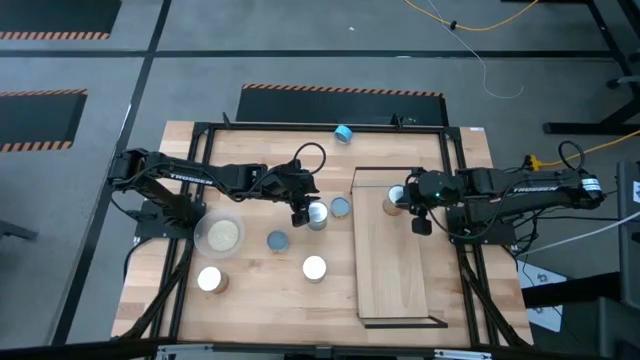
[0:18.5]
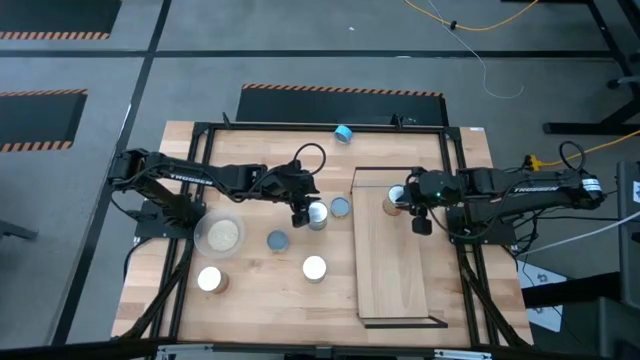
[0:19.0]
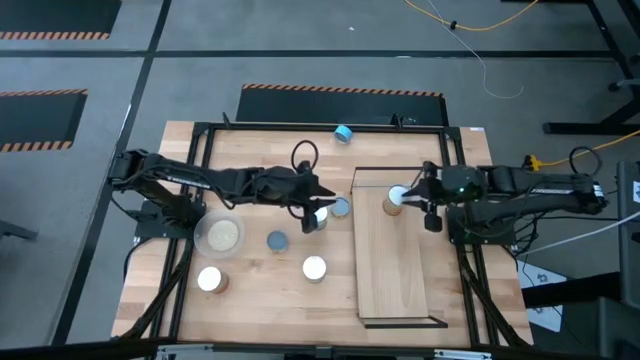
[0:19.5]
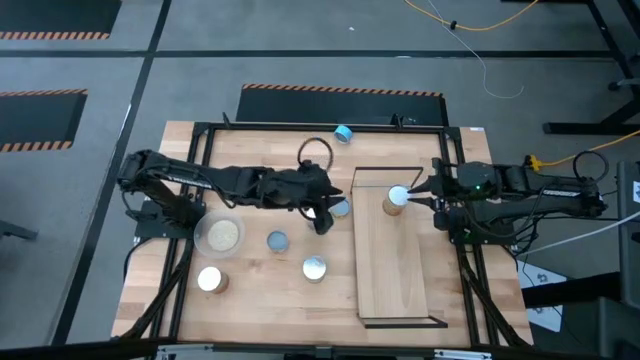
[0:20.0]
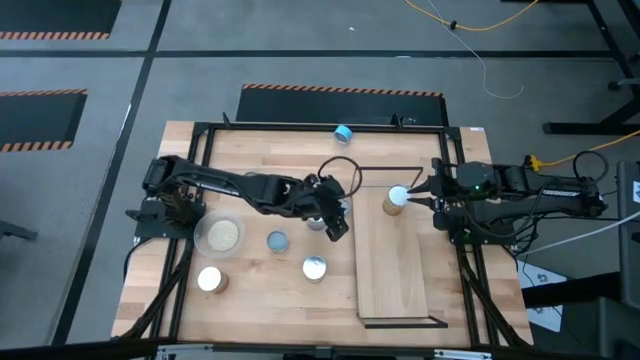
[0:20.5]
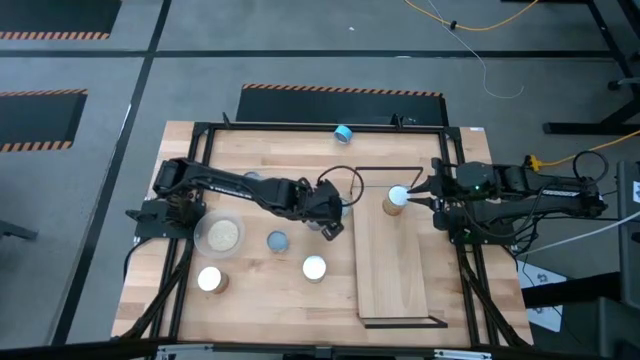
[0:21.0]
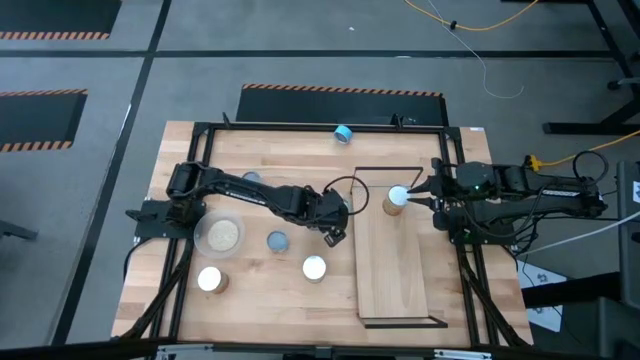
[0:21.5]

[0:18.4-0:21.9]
Task: Pick and place cans onto a shelf
Put the dark blue can onto the shelf aligned with the orange can

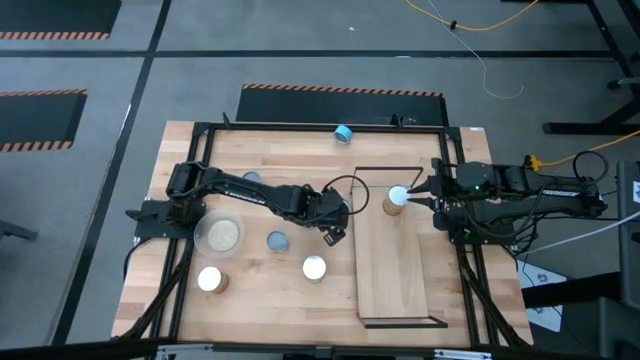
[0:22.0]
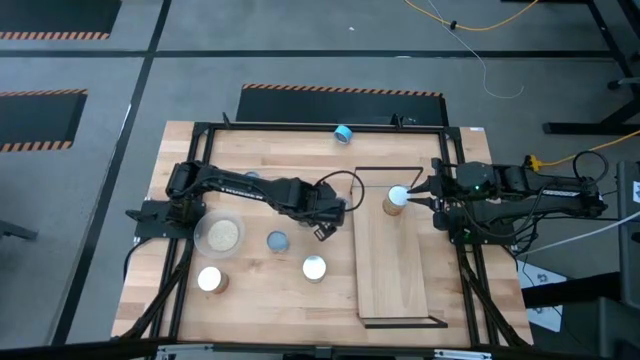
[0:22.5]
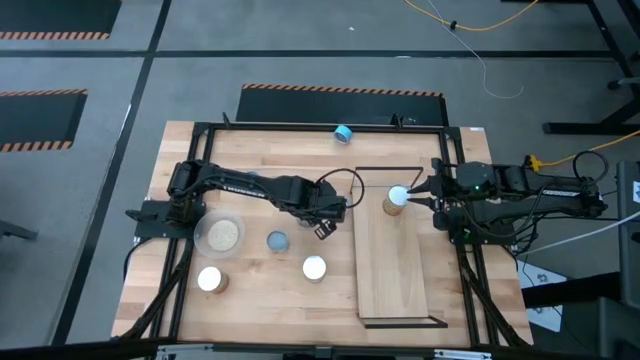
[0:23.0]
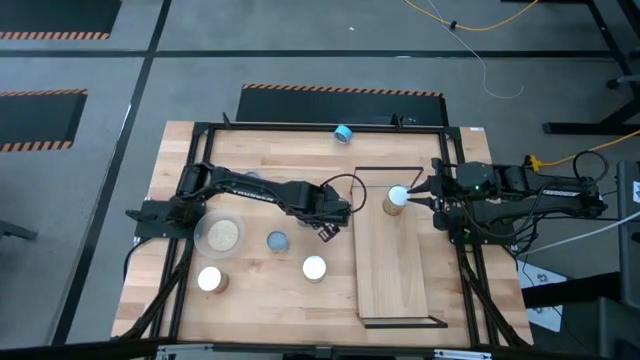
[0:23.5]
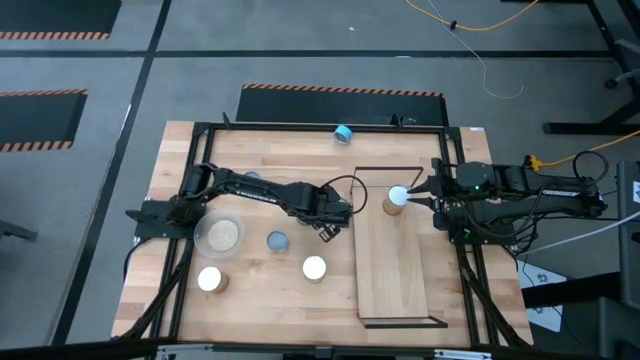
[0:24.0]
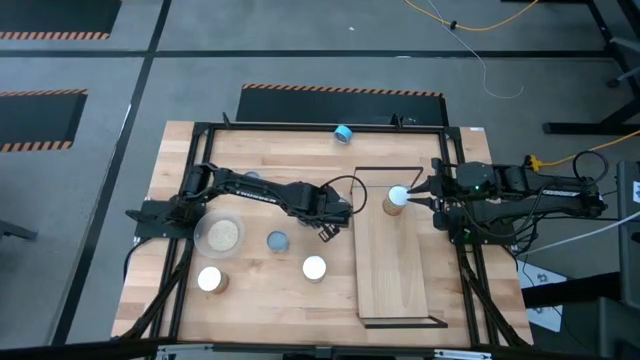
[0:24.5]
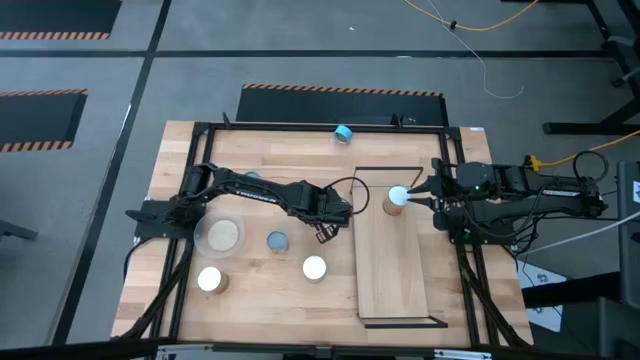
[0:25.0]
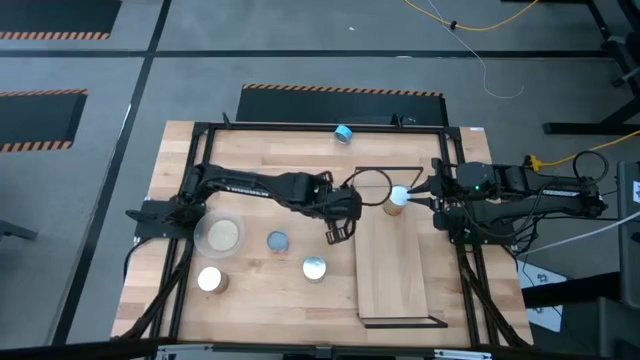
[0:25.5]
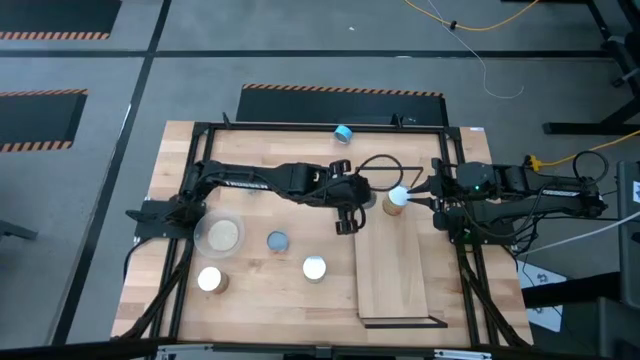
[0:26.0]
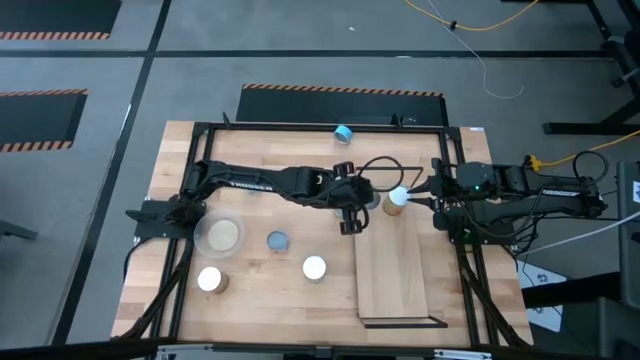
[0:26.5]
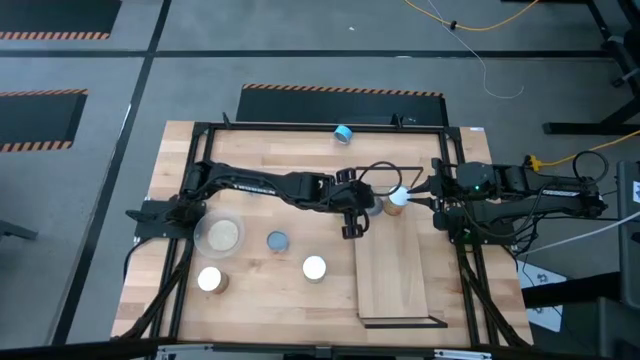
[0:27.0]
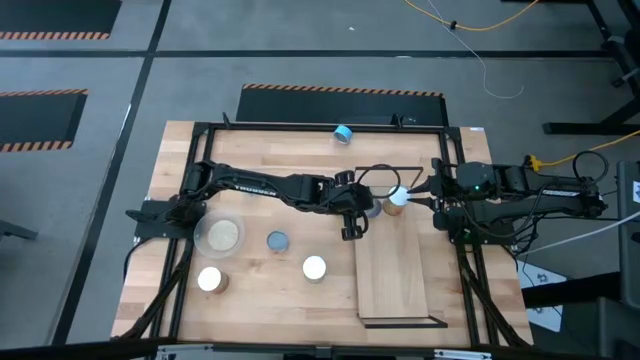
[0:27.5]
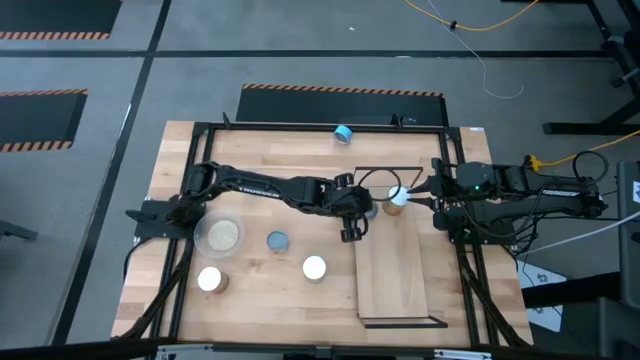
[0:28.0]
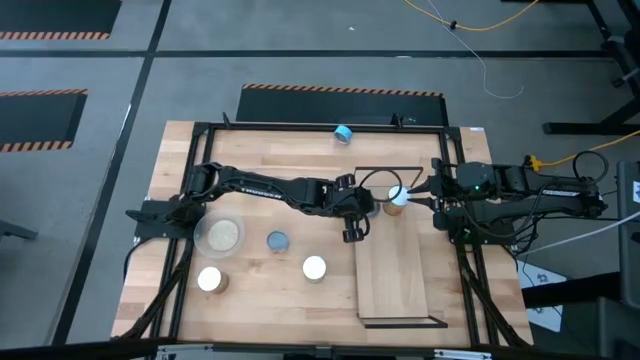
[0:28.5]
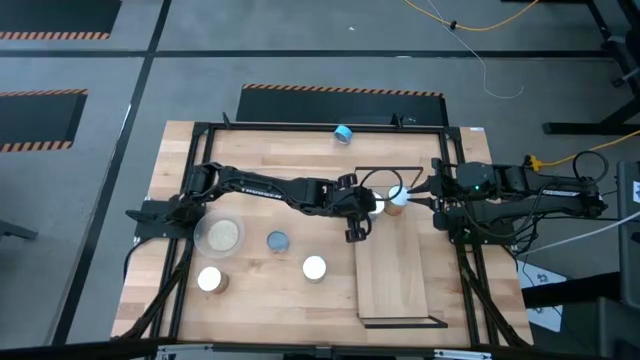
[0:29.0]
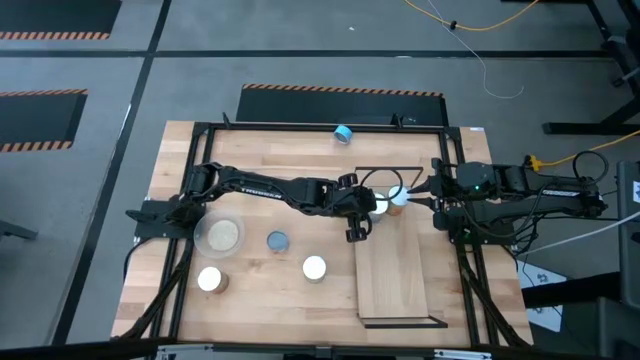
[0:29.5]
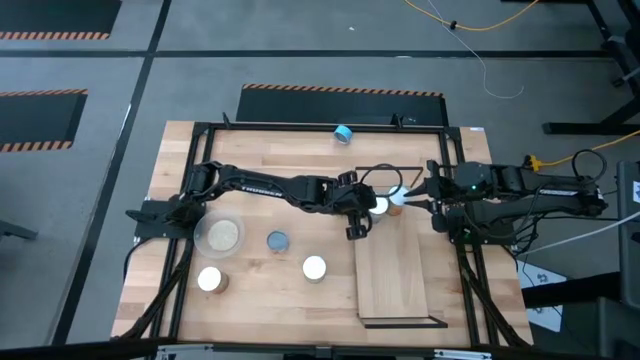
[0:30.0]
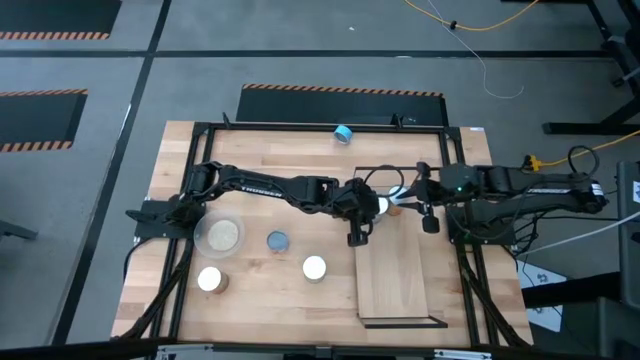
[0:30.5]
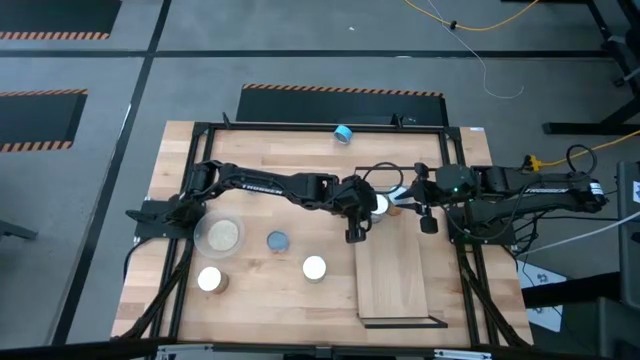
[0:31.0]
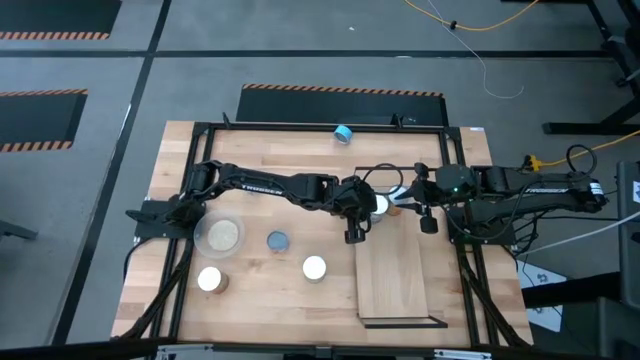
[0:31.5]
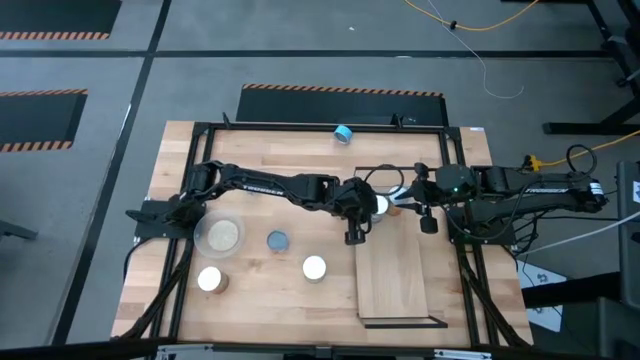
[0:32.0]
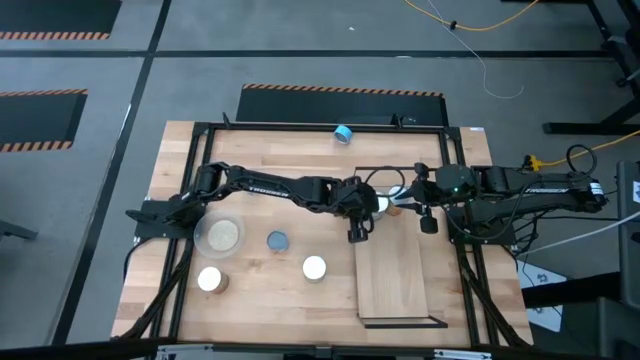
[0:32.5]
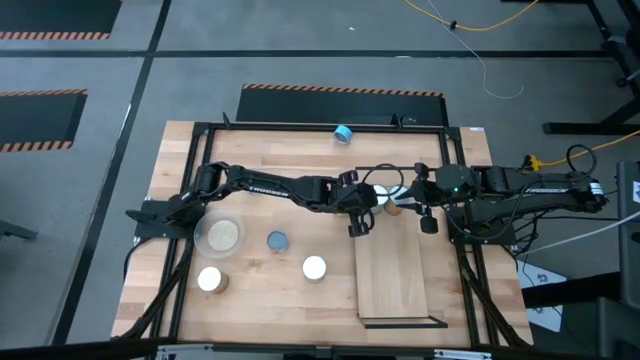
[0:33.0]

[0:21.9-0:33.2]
Put the dark blue can onto the shelf aligned with the orange can
